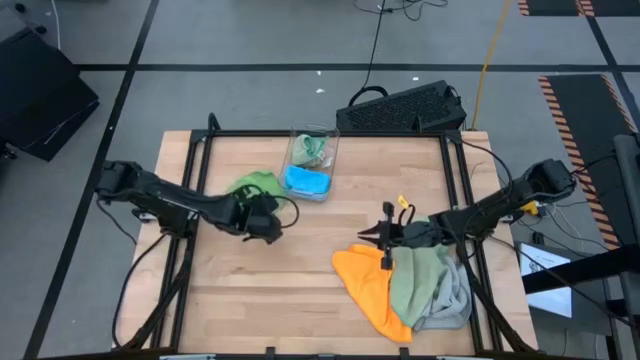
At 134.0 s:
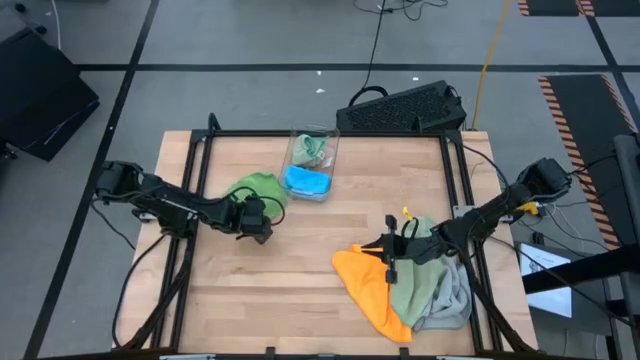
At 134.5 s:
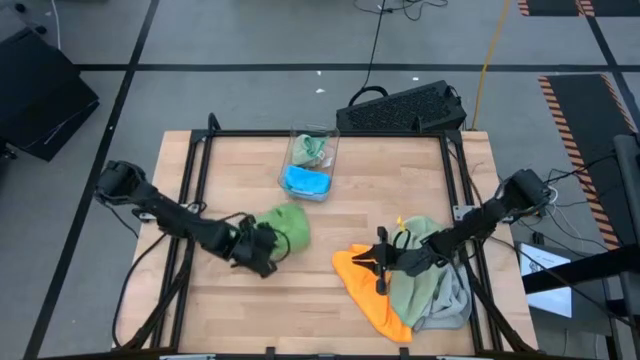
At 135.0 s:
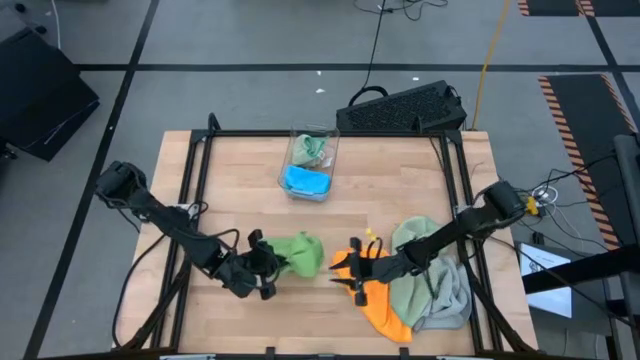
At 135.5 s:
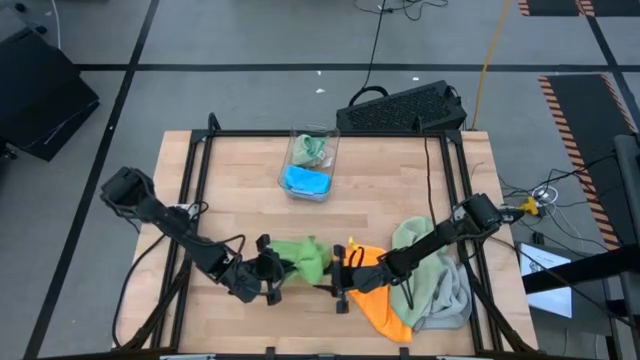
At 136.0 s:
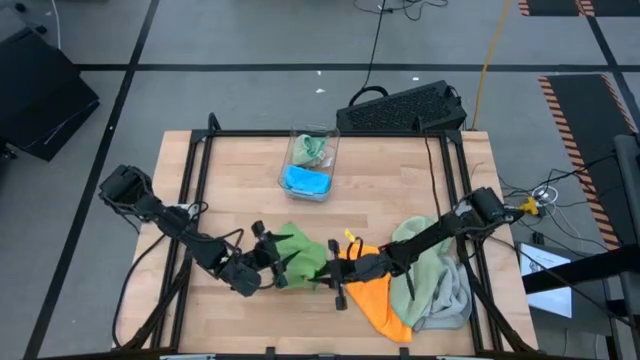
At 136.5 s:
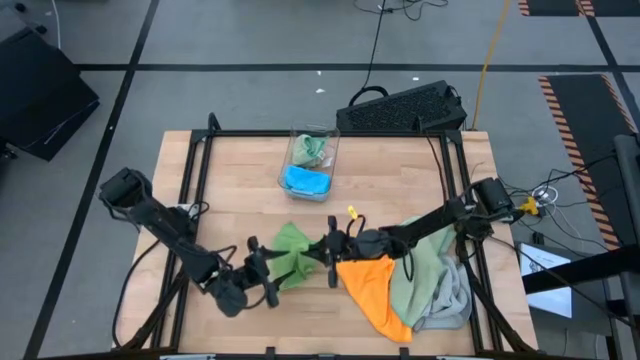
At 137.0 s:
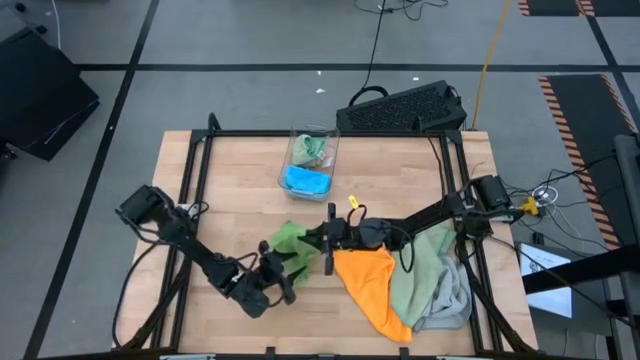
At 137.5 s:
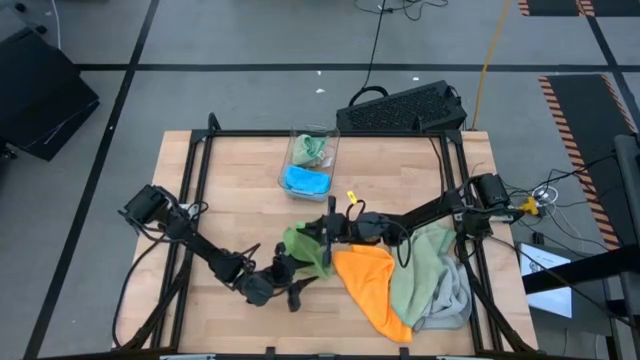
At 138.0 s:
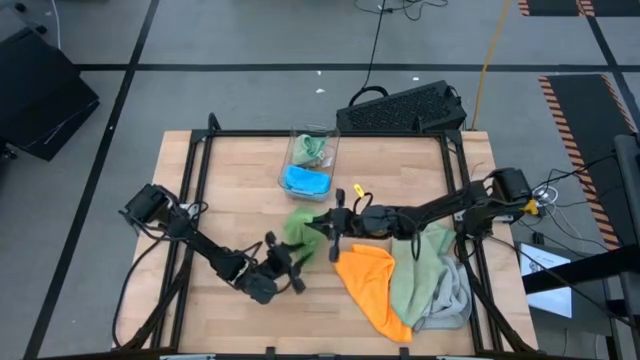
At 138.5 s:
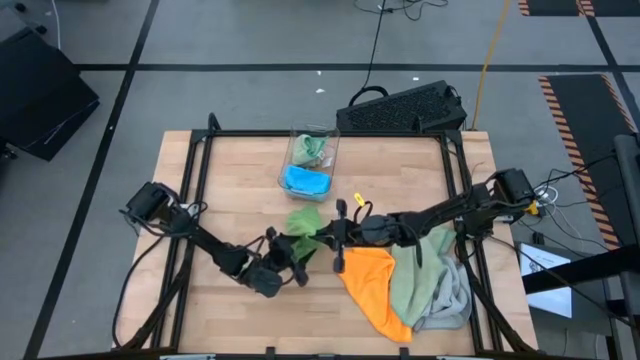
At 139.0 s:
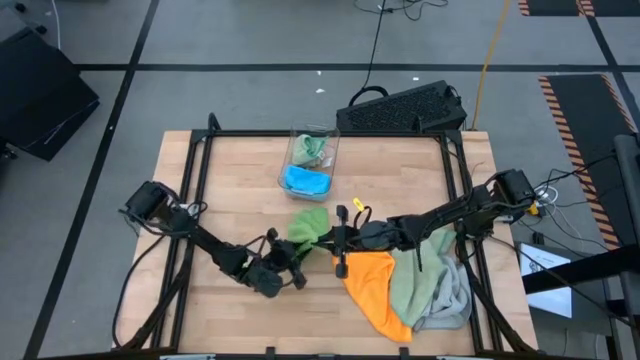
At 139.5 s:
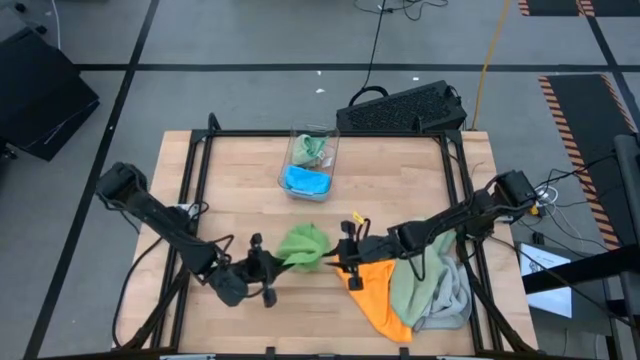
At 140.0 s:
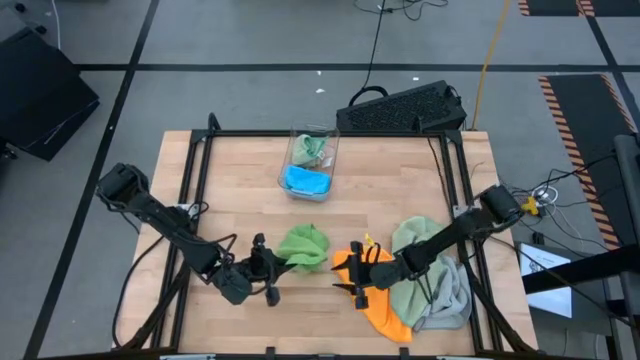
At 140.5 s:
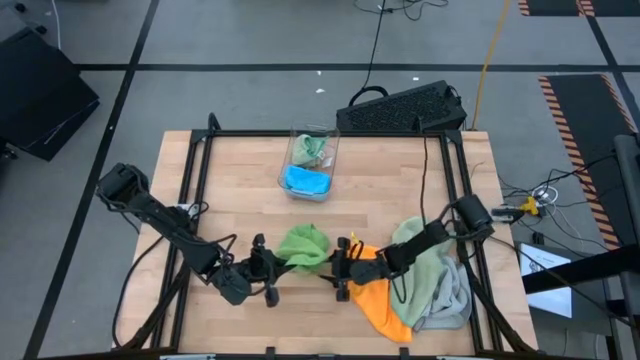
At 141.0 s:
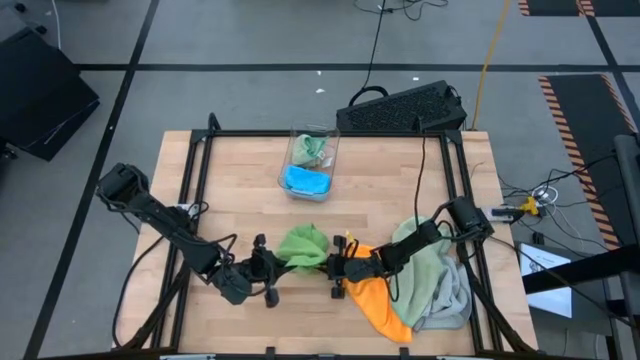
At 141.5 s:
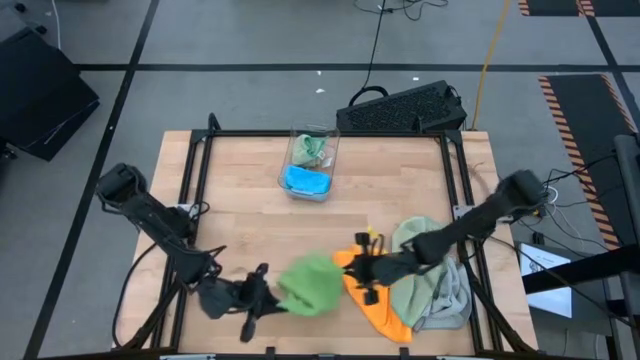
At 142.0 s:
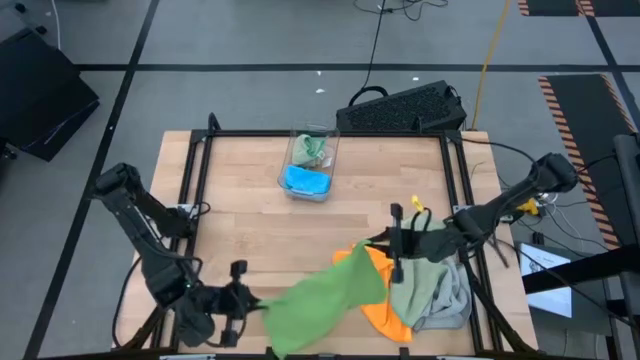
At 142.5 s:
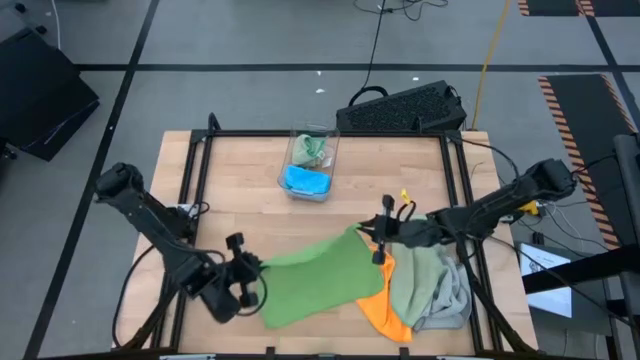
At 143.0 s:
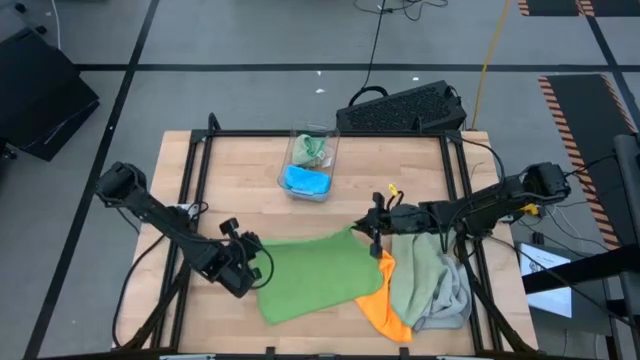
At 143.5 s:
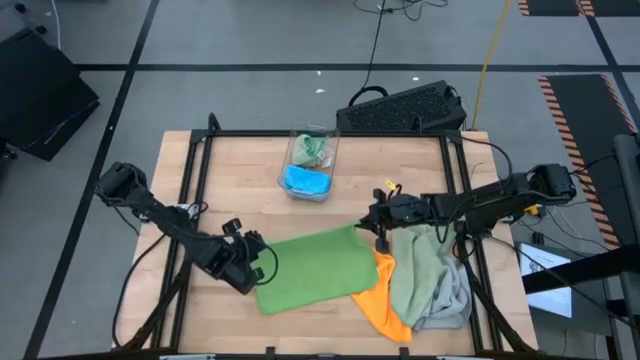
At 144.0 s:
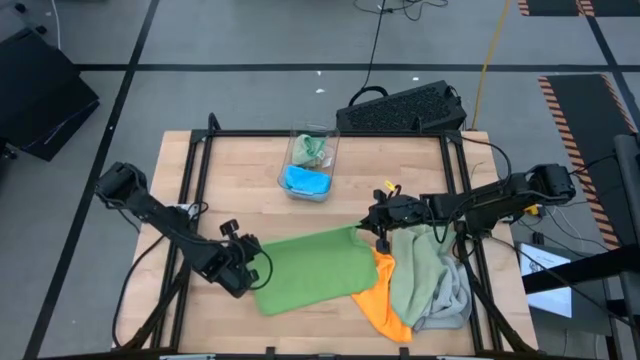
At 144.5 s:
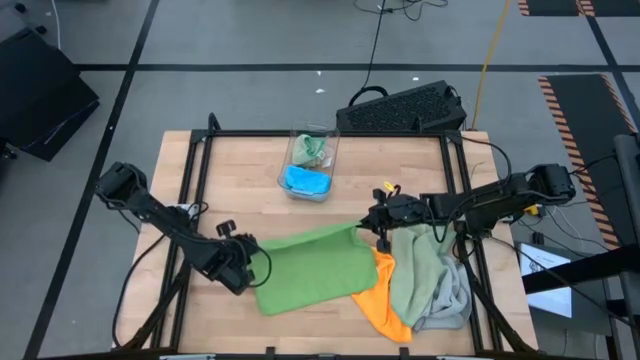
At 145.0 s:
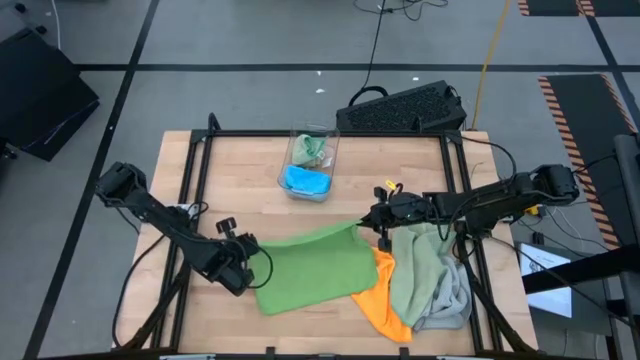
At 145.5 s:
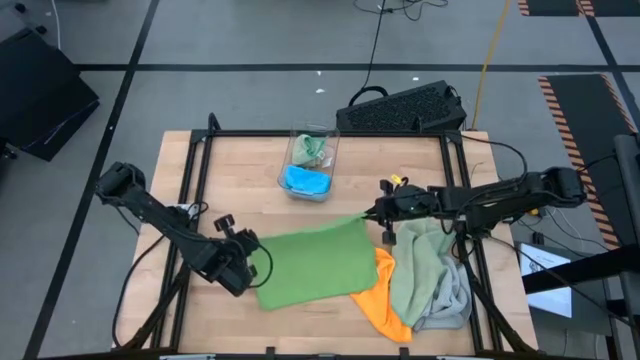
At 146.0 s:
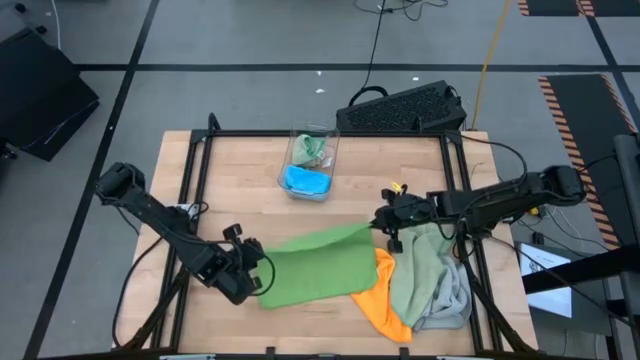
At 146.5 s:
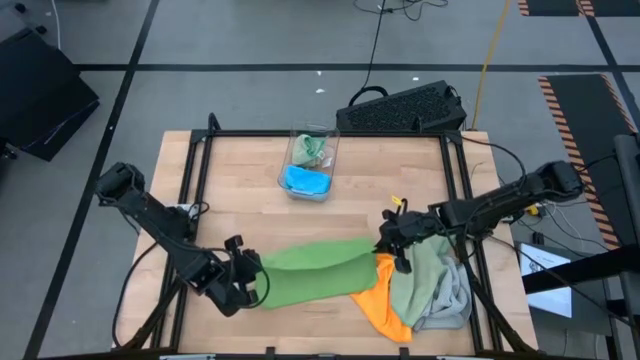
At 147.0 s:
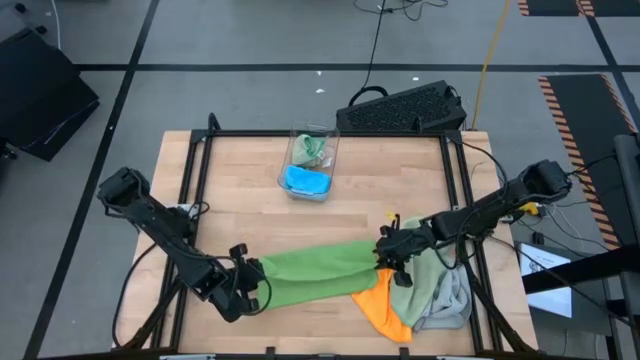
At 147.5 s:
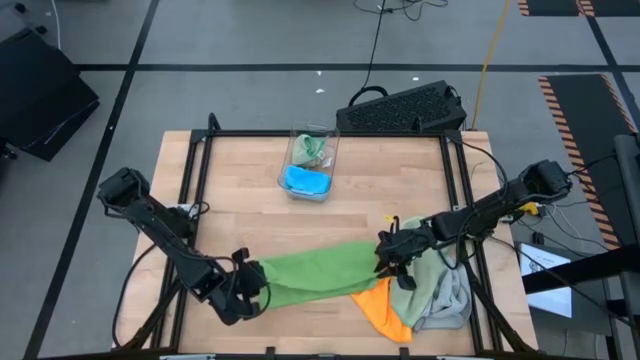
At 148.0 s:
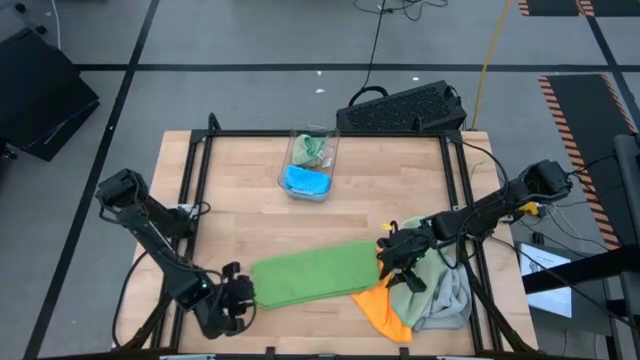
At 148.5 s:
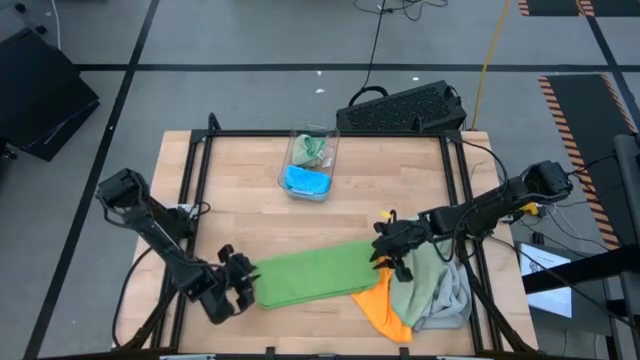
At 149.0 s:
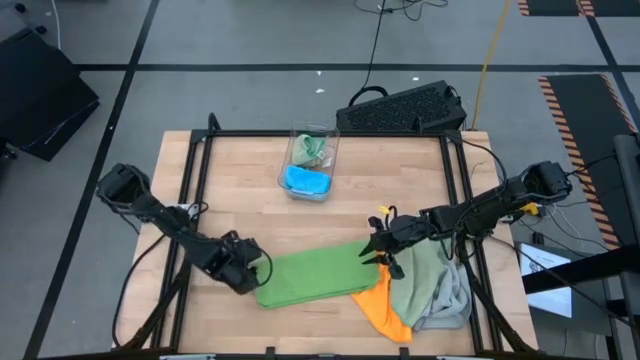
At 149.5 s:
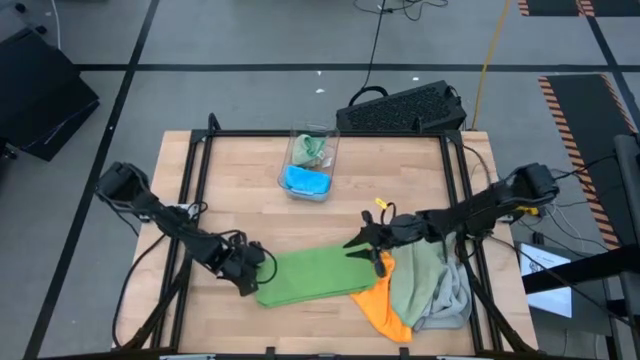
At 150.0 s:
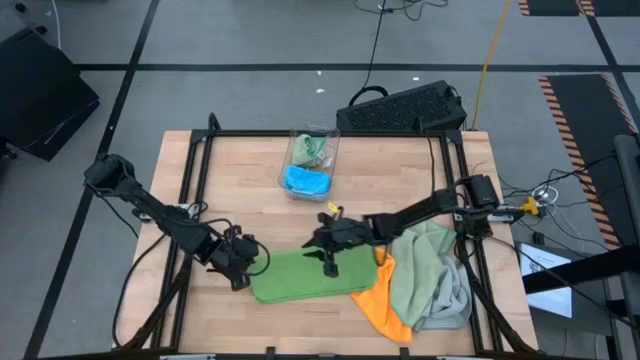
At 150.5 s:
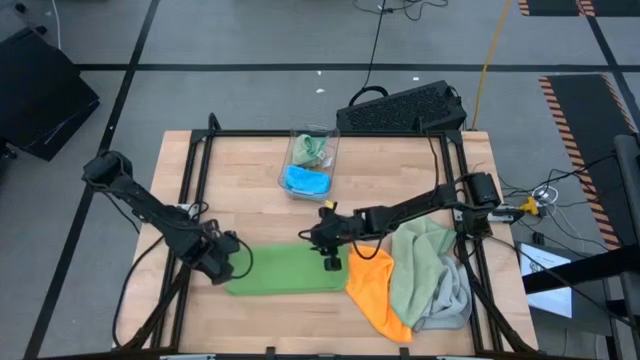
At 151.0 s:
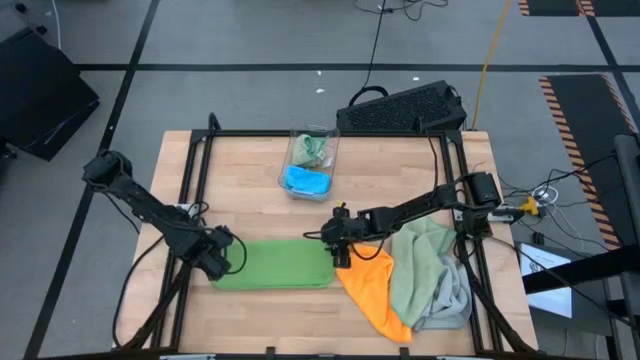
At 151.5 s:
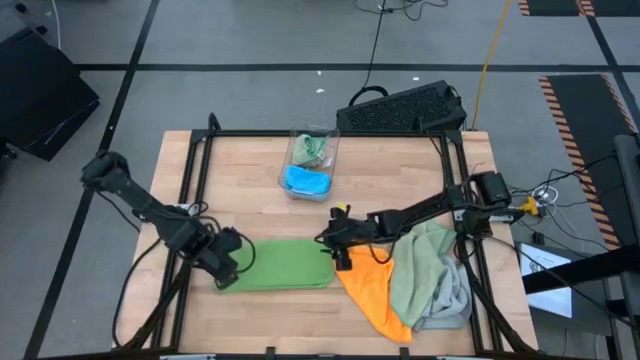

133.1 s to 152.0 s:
Task: Fold microfiber towels
Fold the green towel
